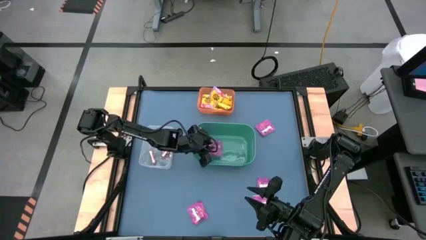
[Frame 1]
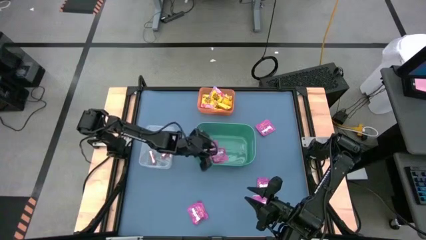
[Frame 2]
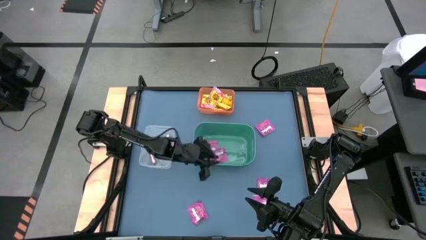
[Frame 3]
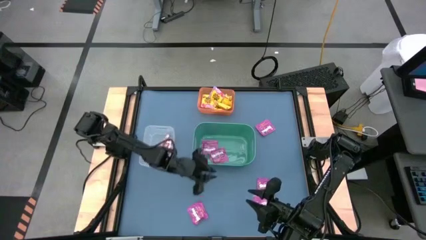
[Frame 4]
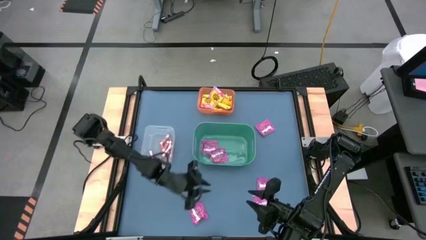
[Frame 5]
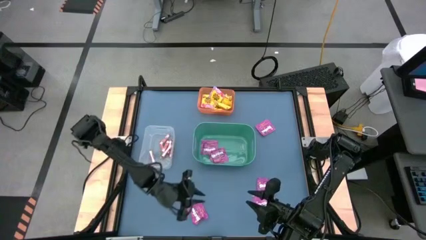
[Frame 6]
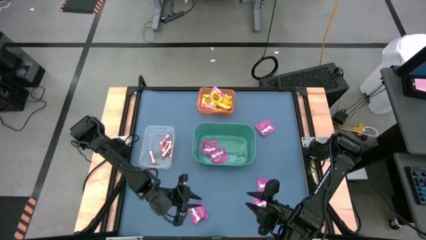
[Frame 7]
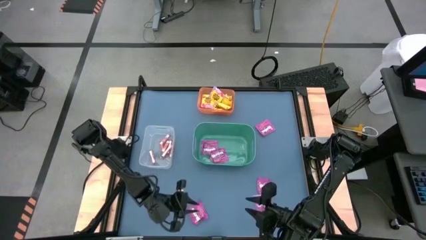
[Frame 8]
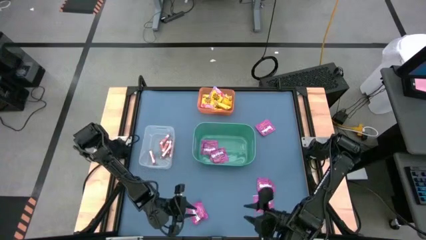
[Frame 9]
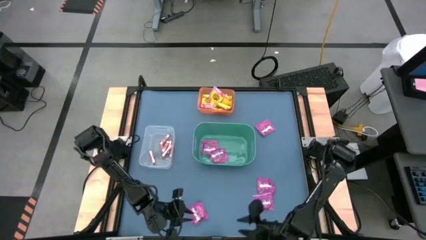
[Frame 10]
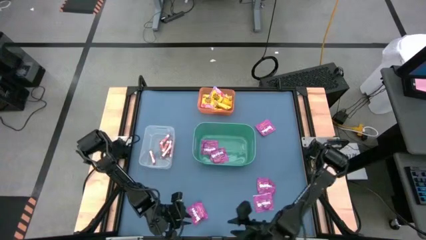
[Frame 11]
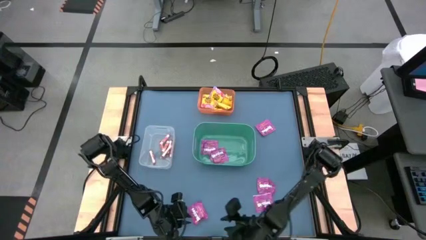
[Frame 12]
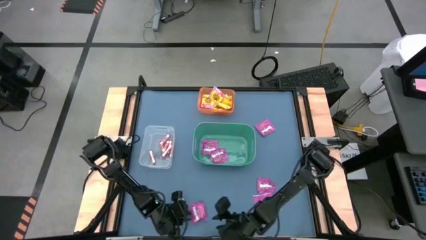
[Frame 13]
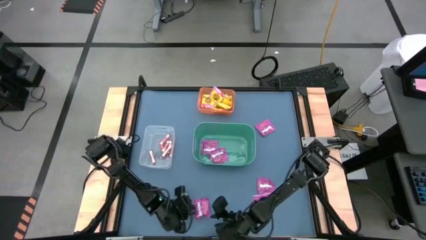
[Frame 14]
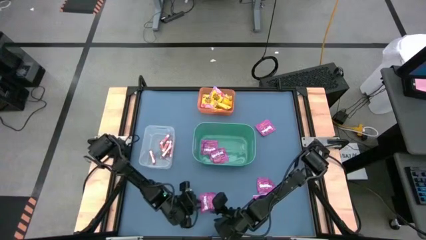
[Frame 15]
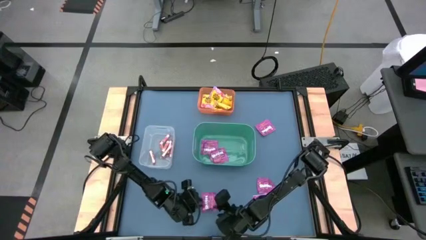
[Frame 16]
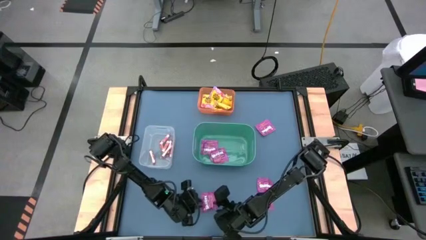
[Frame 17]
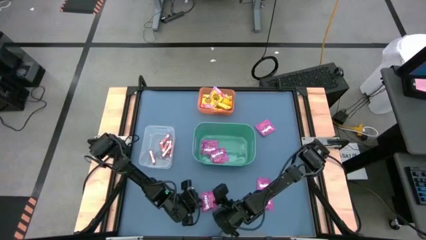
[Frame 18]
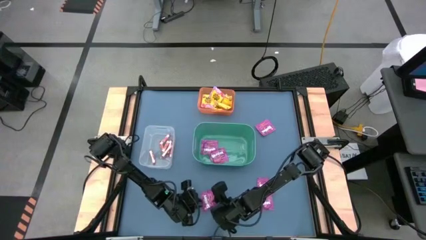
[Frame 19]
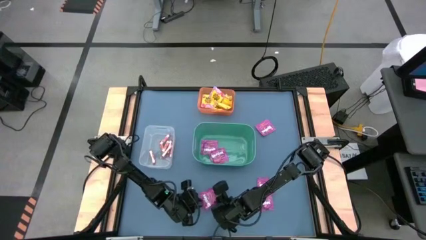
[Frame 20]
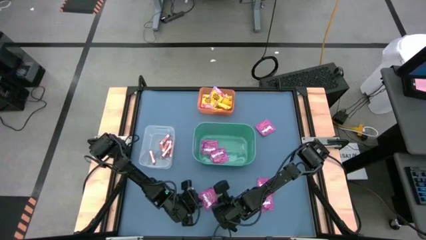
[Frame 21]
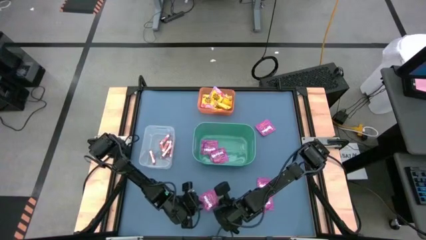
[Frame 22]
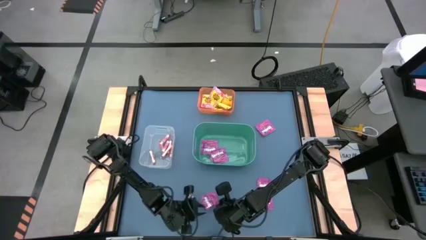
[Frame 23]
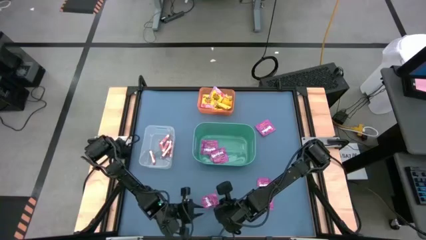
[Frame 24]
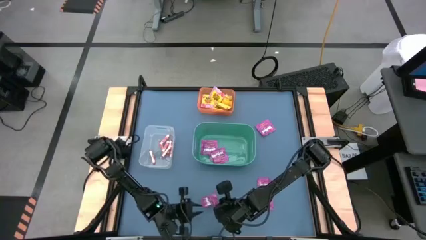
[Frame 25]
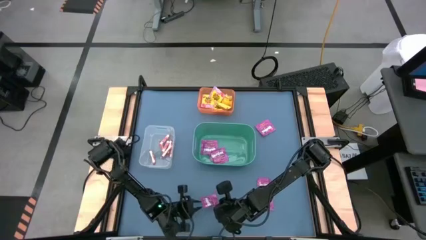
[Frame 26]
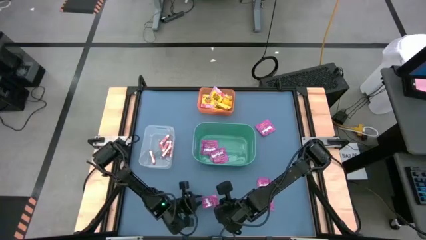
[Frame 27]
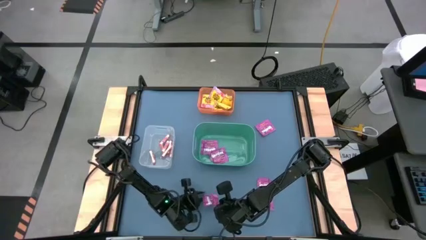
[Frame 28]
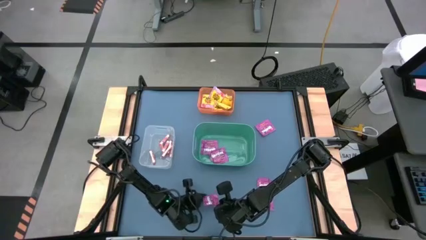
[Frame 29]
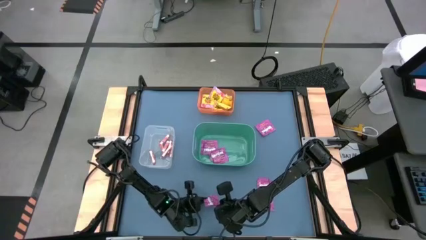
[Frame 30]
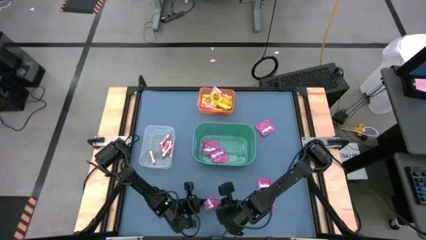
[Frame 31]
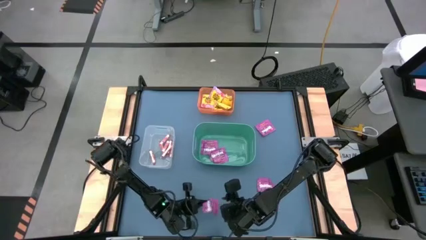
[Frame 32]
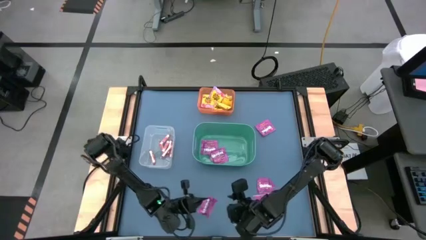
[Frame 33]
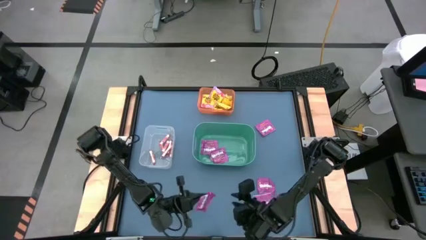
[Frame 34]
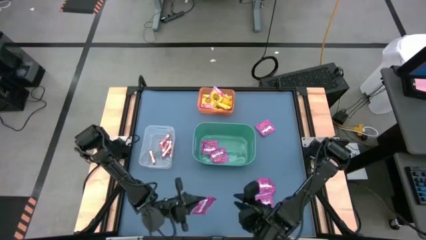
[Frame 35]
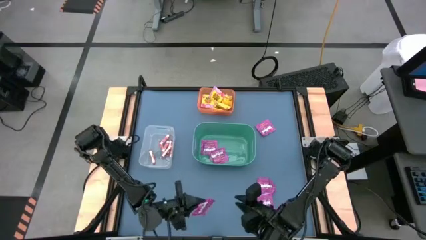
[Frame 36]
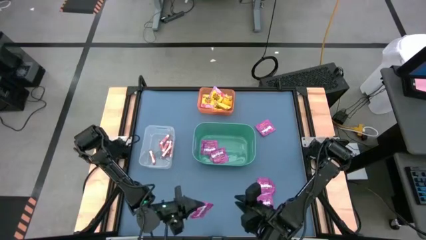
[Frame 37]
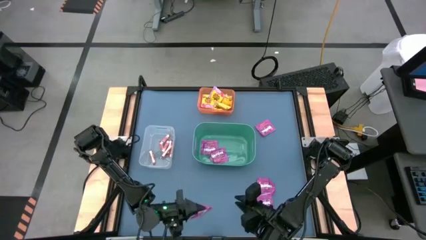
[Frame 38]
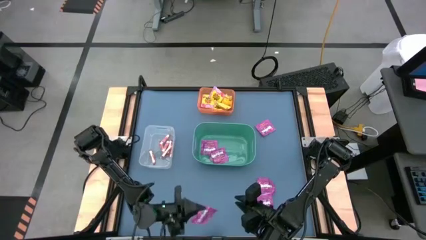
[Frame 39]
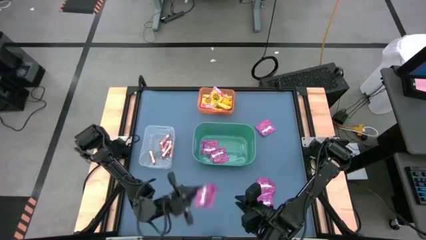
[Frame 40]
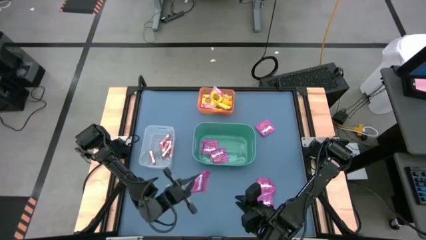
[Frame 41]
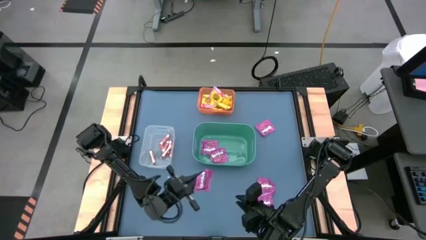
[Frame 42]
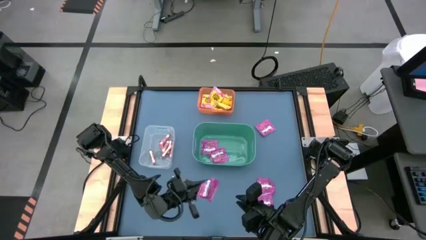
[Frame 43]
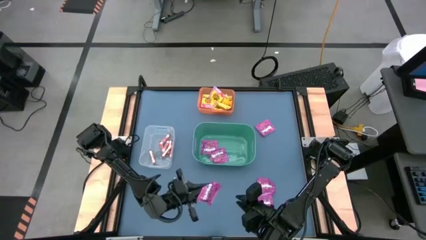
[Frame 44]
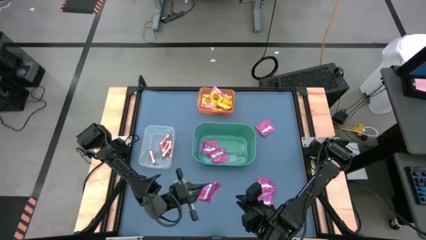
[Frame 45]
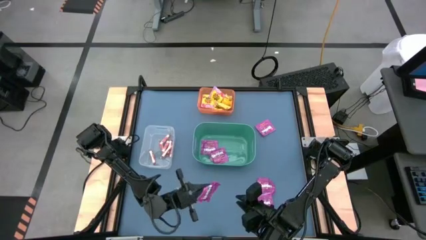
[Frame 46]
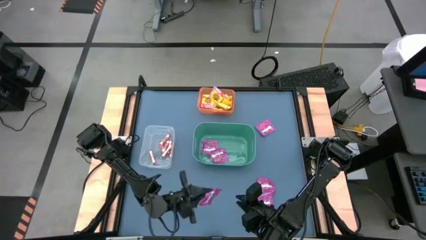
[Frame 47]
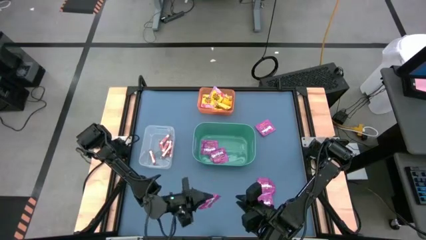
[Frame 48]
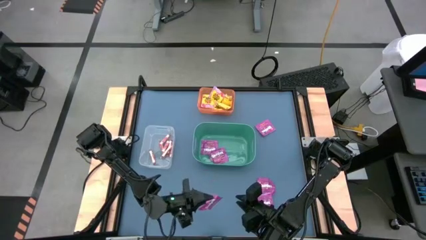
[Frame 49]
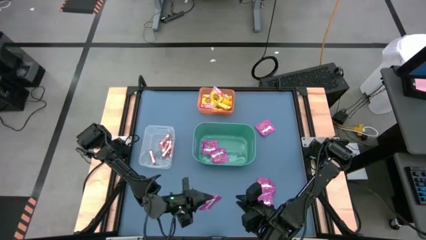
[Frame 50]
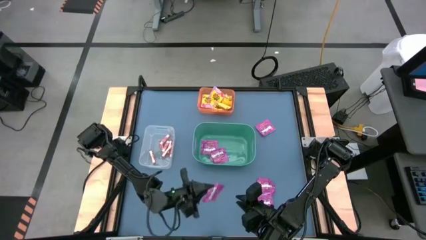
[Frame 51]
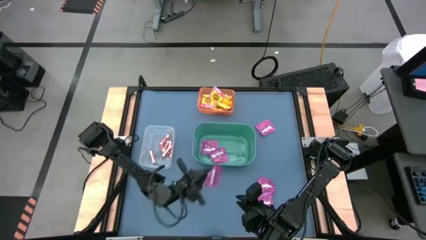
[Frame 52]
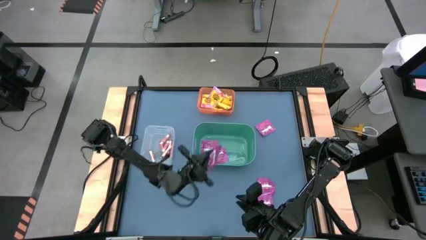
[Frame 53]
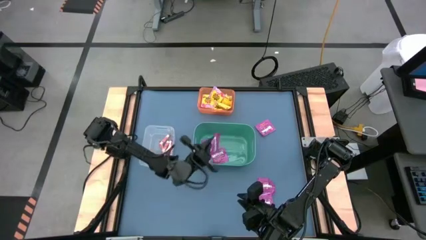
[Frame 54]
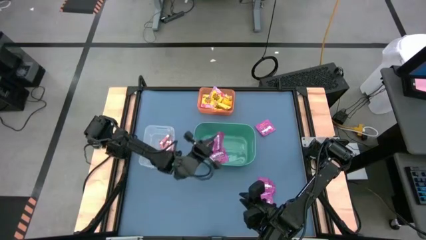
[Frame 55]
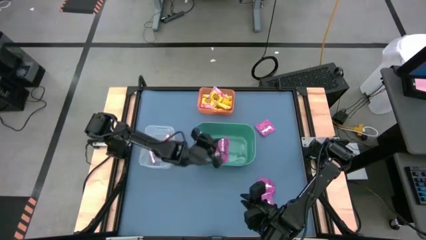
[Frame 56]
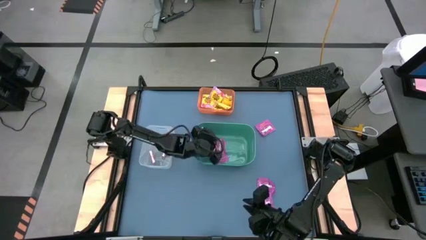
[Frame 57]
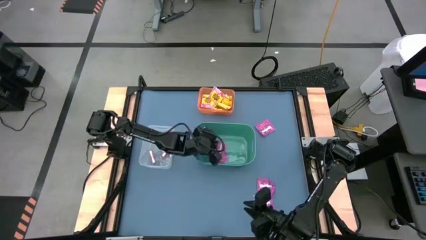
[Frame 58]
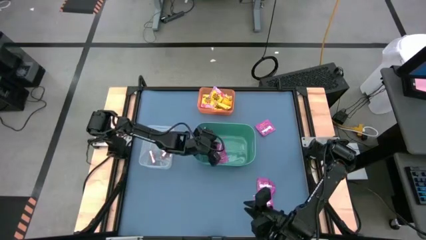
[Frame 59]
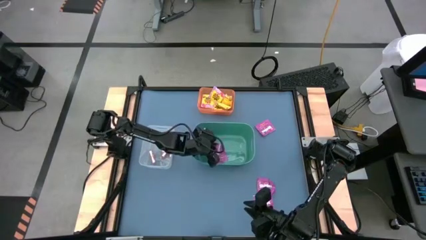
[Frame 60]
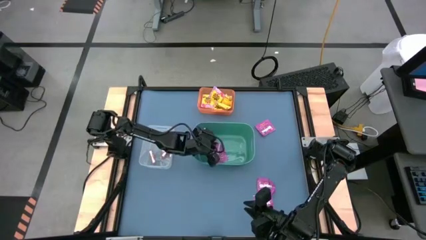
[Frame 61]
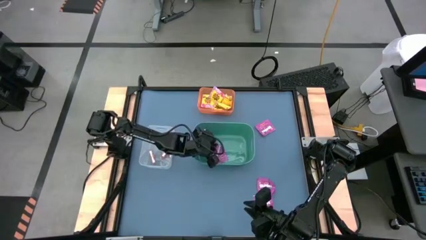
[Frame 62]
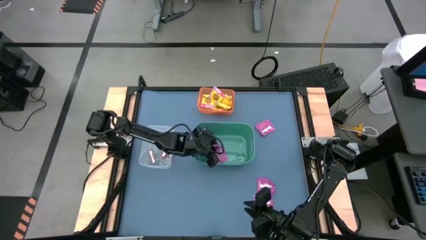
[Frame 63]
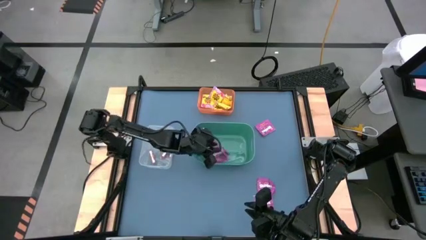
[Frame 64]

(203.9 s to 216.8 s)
Task: Sort candy
Put the purple candy into the green bin

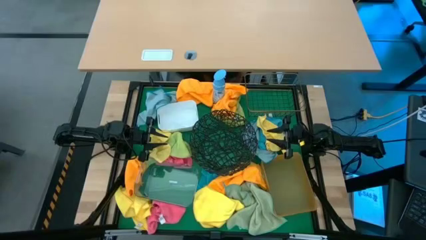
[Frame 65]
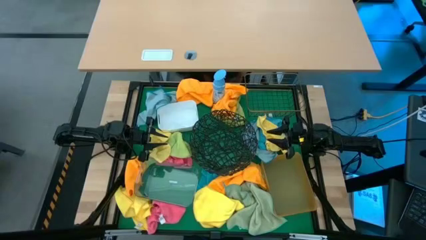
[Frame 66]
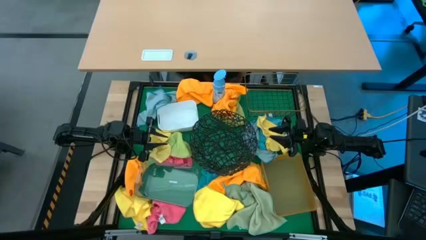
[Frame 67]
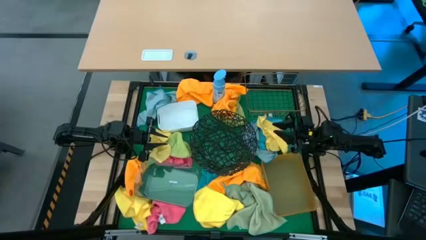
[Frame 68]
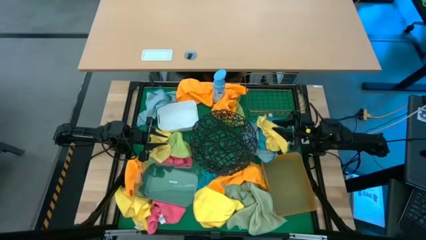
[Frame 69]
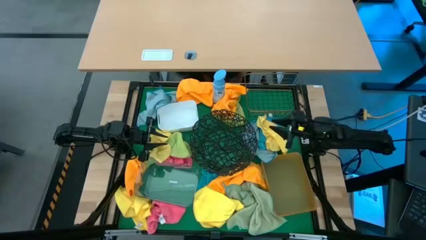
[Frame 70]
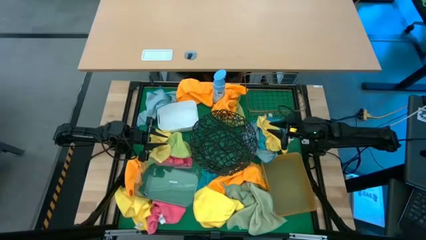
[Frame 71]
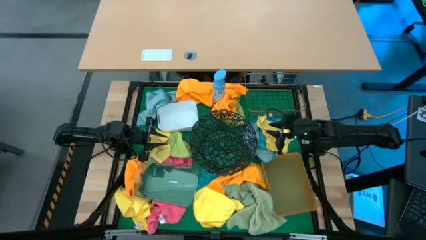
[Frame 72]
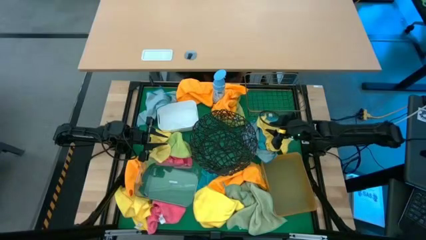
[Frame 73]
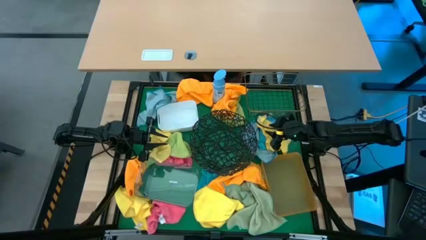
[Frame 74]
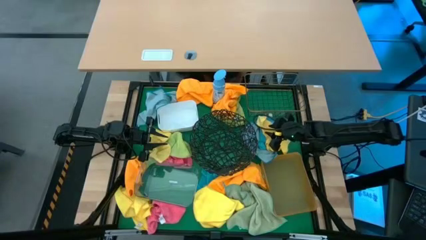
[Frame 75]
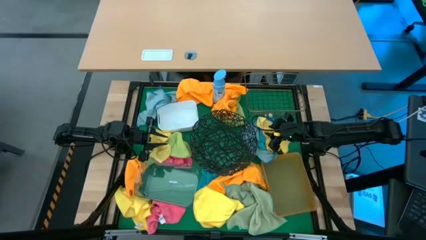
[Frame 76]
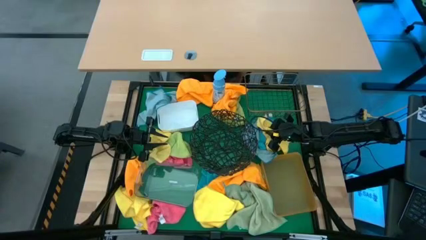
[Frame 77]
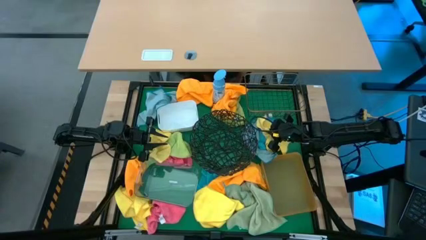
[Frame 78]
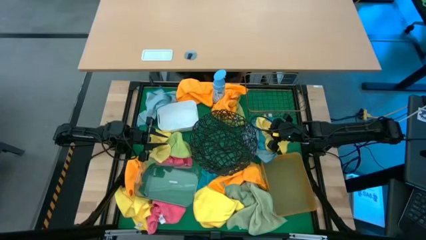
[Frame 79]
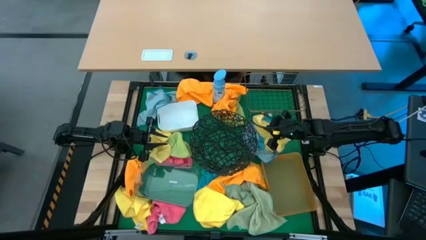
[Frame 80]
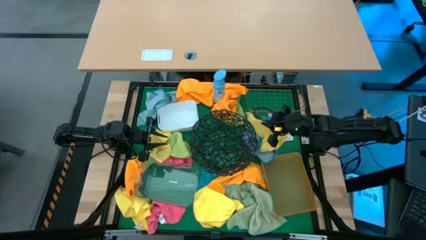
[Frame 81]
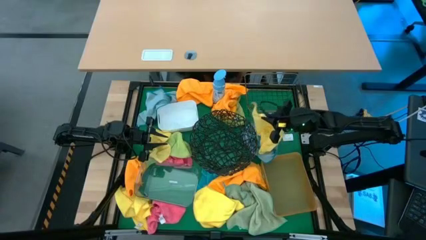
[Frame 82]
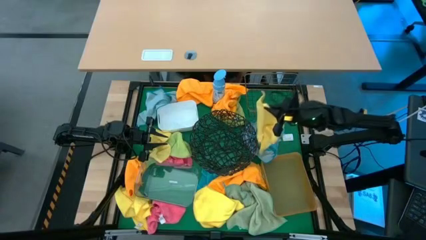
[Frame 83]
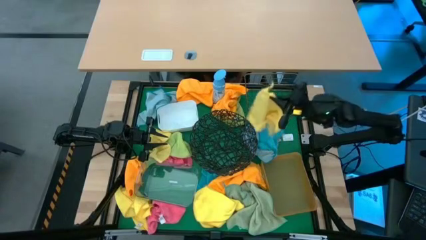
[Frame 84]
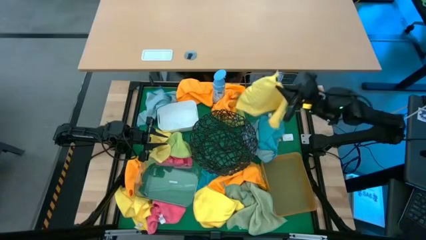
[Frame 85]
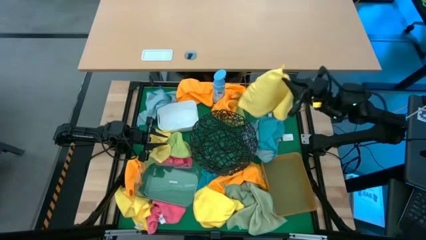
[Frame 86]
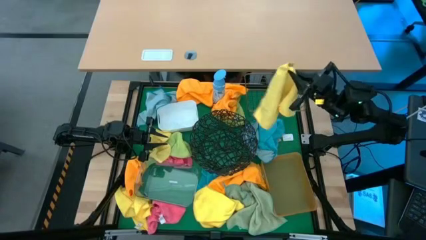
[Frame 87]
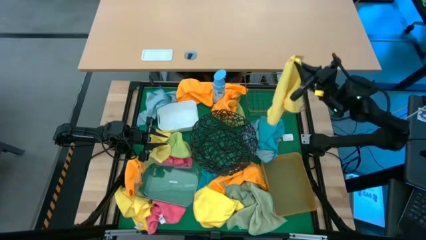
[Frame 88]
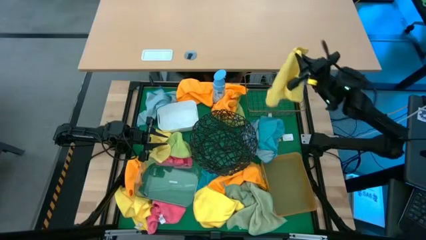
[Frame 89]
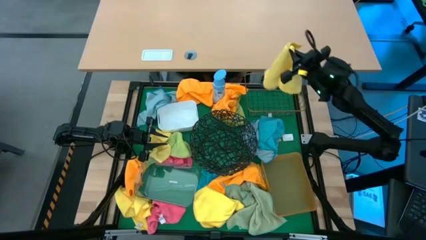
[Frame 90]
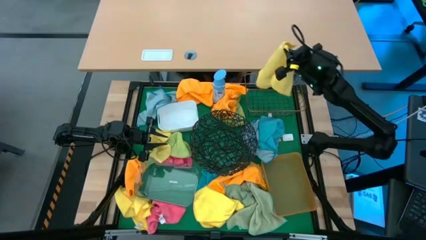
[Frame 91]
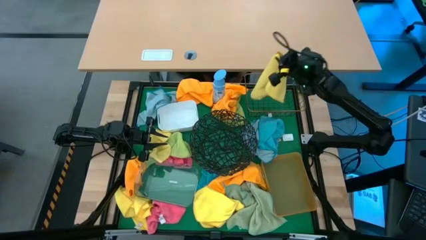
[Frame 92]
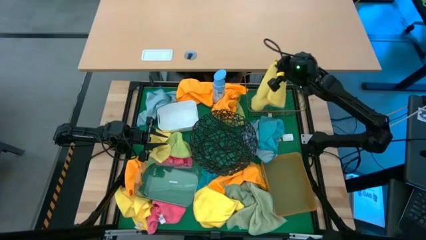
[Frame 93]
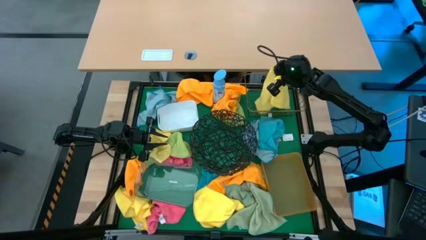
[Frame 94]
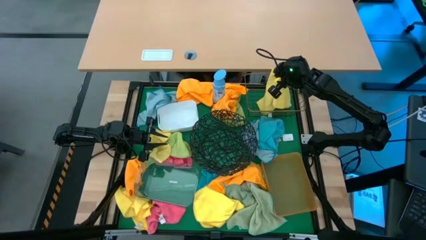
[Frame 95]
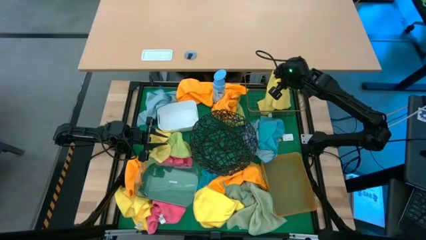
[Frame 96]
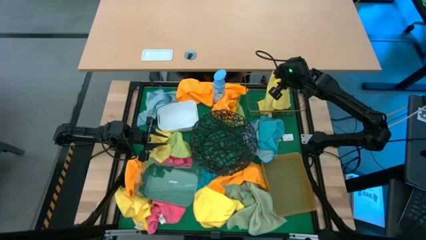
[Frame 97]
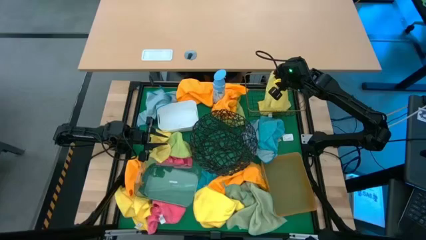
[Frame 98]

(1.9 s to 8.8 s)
Task: Sort microfiber towel by color & place in baskets
Put the yellow microfiber towel into the square wire basket
